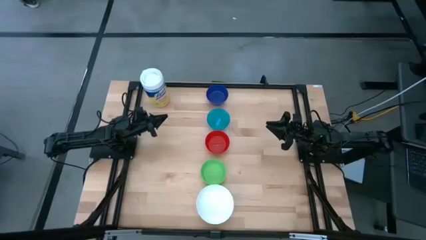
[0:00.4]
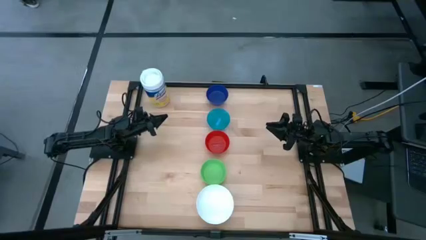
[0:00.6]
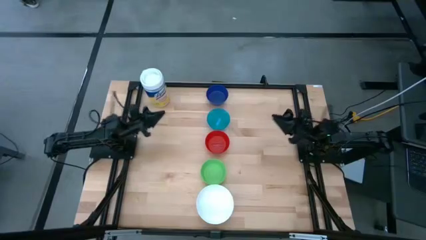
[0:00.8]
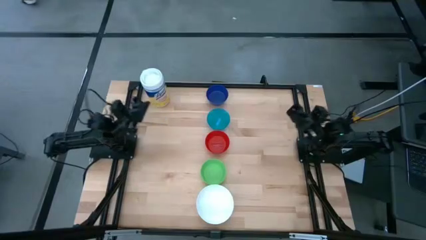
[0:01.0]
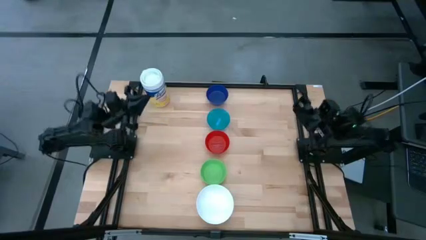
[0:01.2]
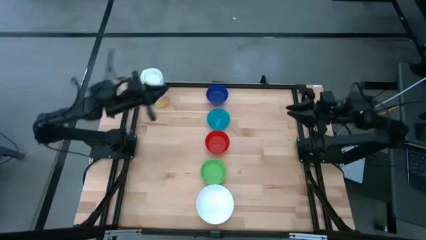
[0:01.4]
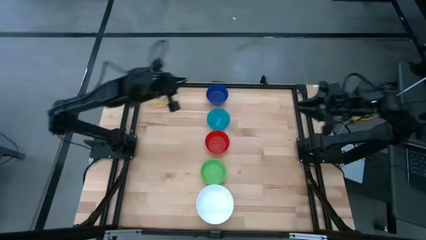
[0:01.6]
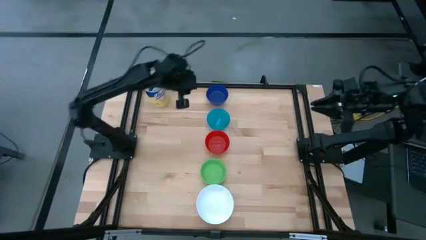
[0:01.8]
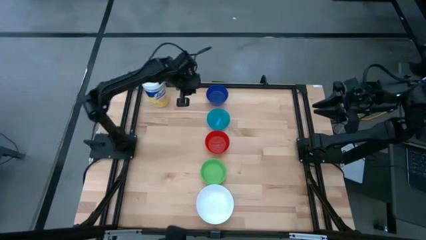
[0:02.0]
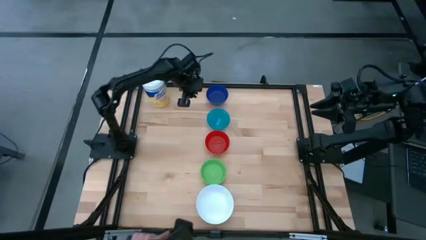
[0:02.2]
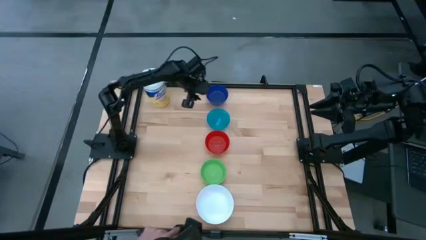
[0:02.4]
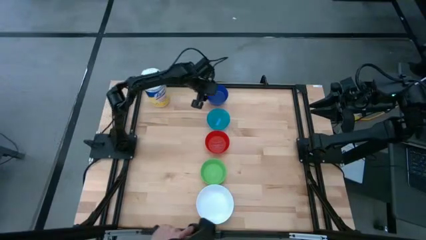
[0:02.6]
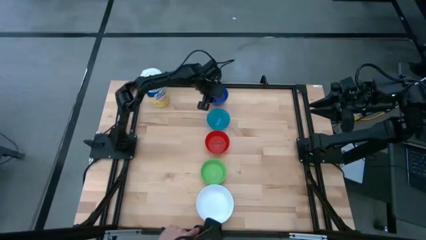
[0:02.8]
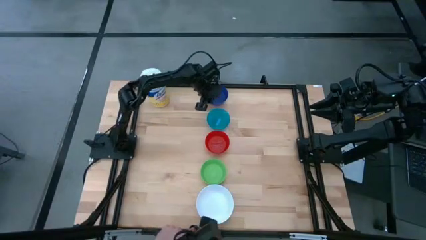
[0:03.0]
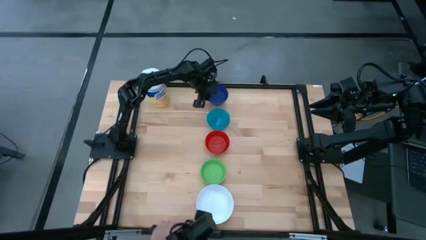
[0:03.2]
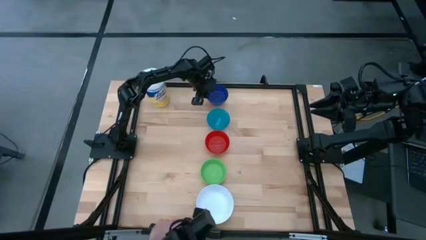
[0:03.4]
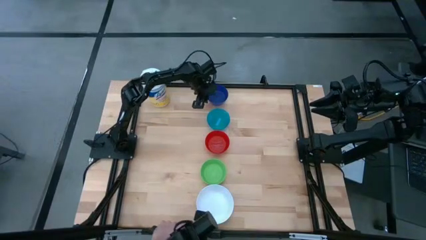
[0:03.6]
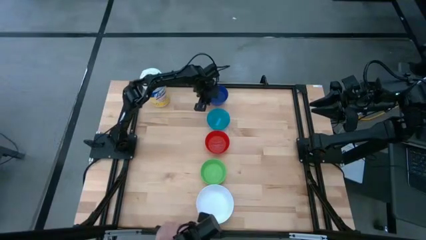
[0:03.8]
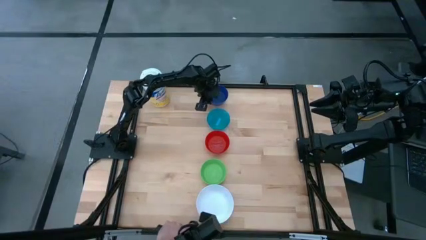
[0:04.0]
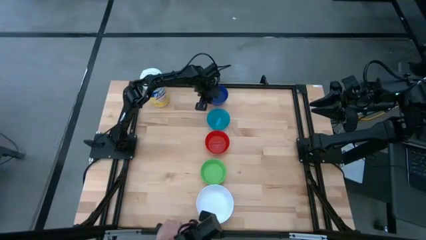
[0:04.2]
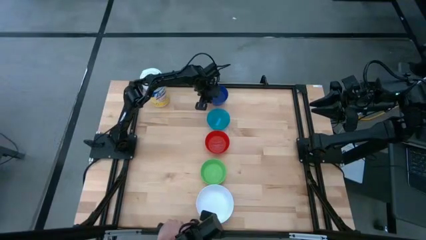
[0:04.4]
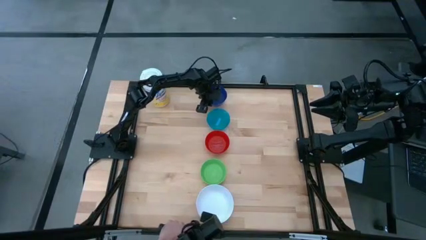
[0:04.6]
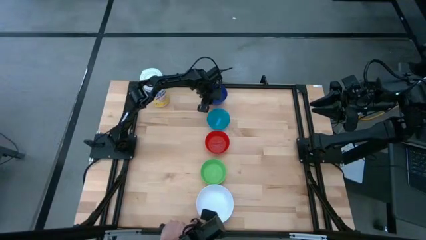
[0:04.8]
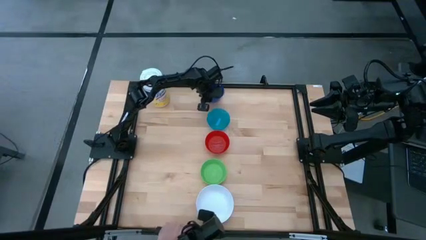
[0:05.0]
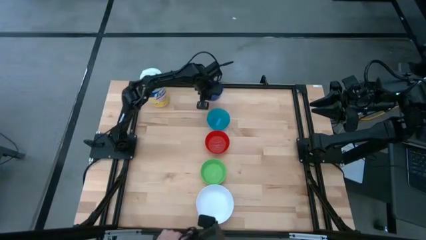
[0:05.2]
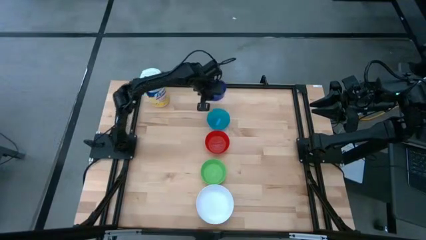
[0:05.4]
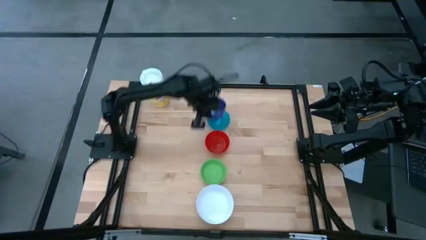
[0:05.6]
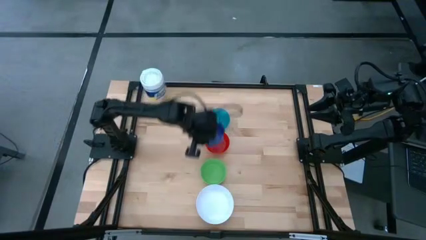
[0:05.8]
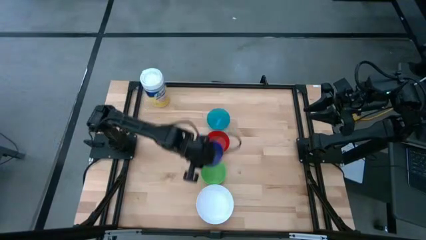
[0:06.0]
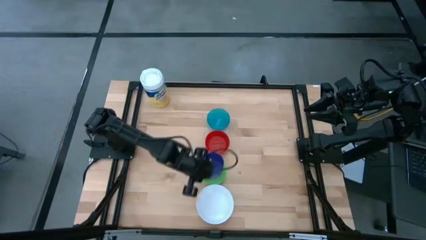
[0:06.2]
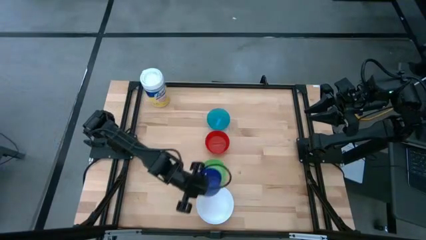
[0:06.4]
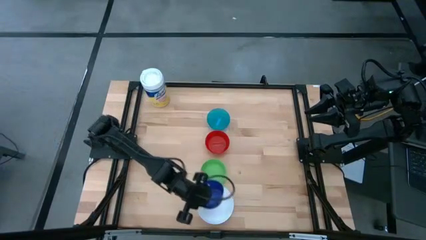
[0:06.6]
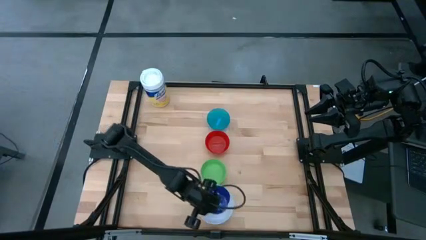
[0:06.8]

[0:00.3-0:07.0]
Put the dark blue bowl on the white bowl

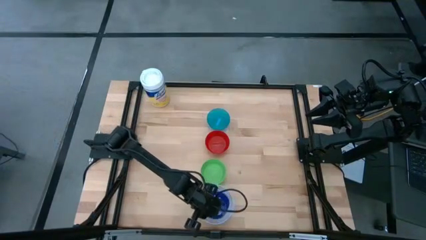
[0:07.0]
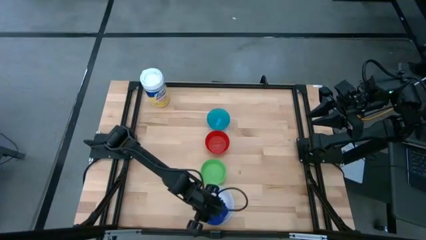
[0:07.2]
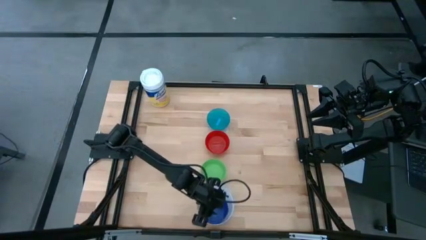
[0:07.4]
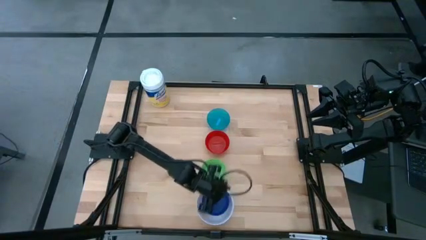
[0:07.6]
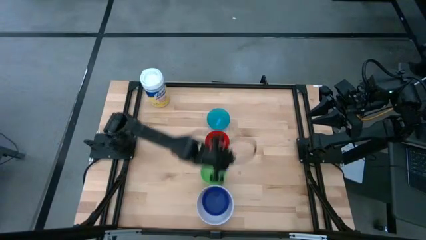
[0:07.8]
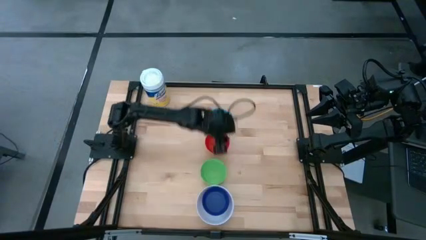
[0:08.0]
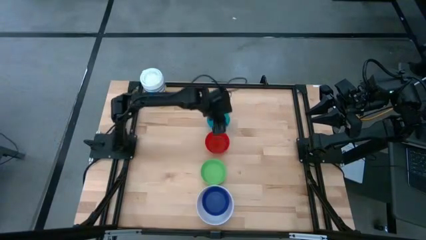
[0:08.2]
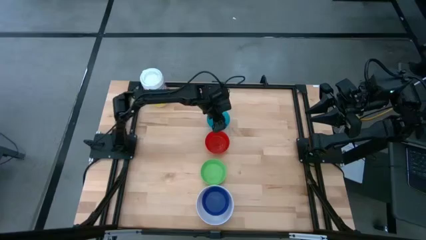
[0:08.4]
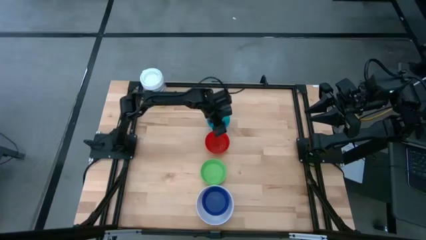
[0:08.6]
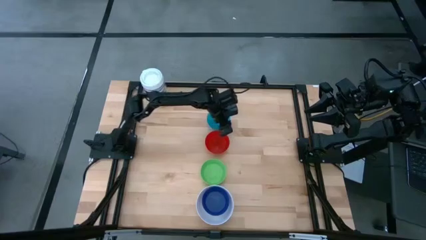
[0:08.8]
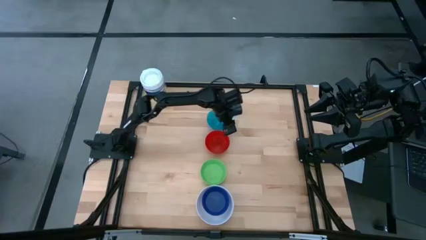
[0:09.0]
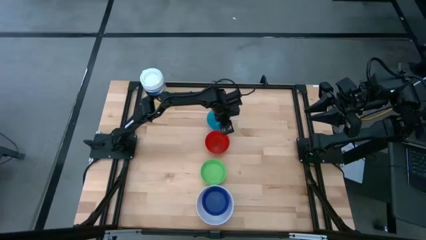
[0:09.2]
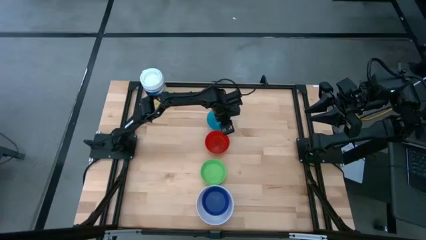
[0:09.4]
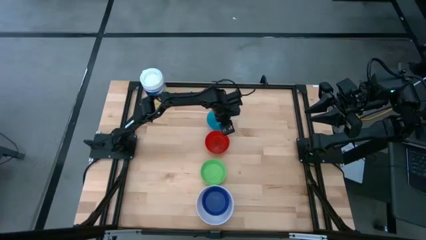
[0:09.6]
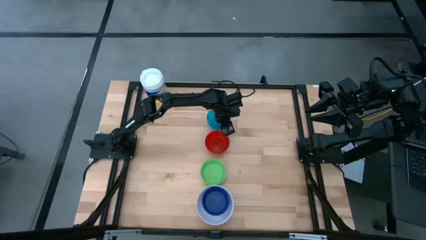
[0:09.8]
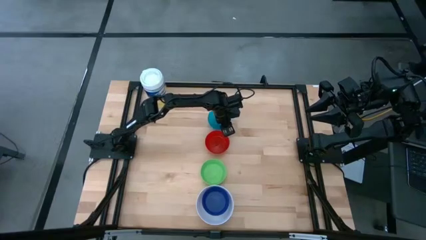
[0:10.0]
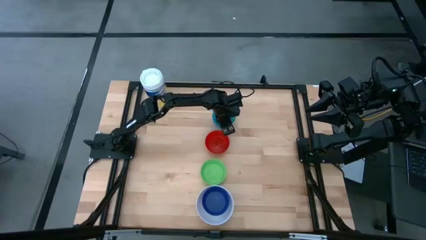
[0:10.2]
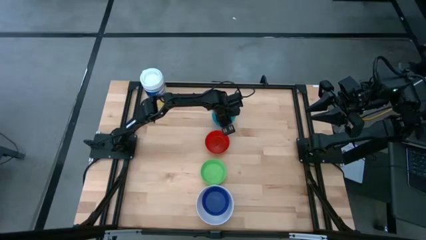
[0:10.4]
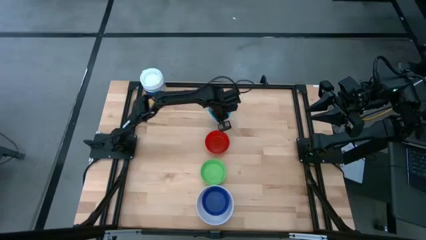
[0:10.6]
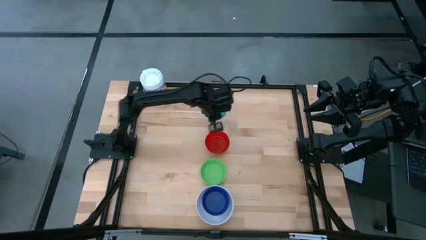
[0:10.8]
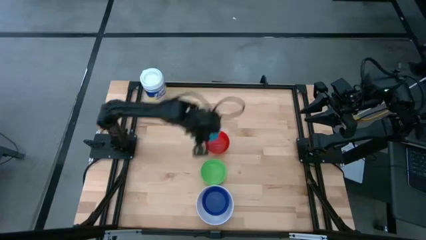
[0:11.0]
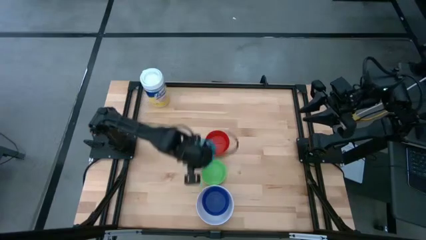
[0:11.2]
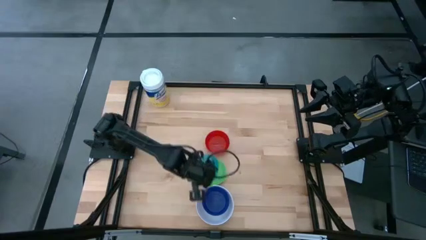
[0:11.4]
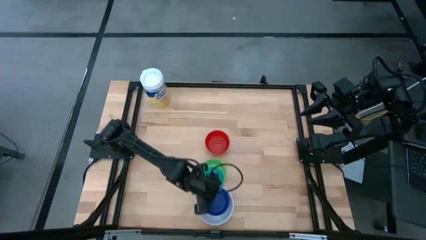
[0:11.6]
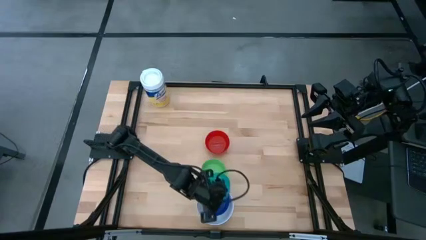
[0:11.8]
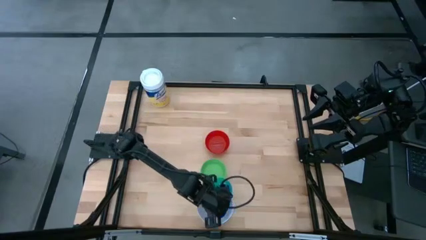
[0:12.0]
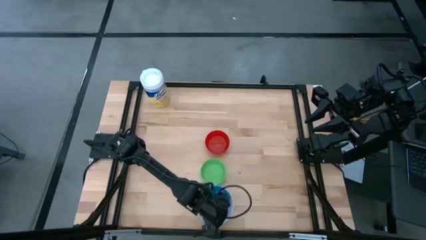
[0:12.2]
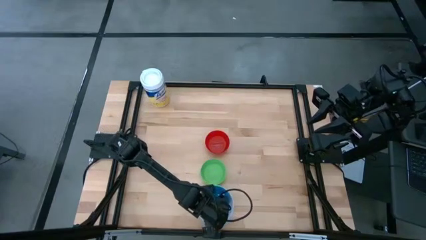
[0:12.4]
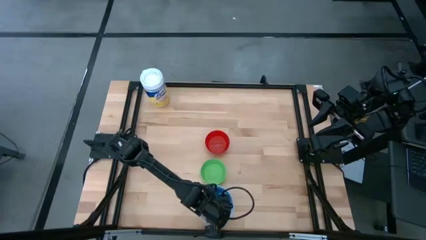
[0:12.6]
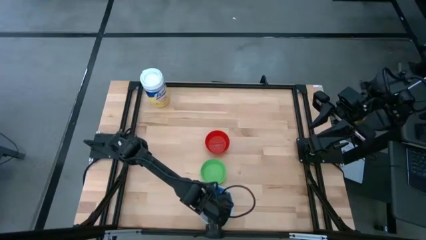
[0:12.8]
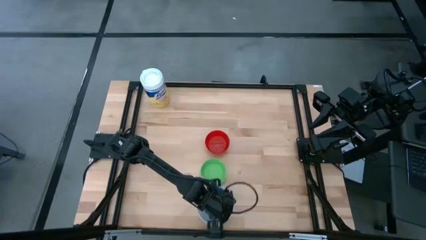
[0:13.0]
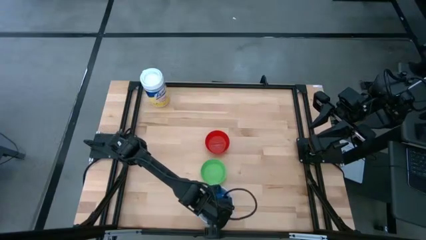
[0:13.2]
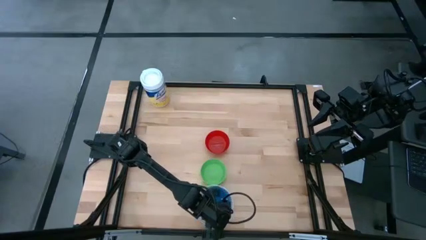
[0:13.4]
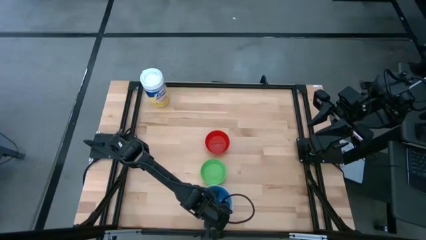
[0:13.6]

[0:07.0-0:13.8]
Put the blue bowl on the dark blue bowl
